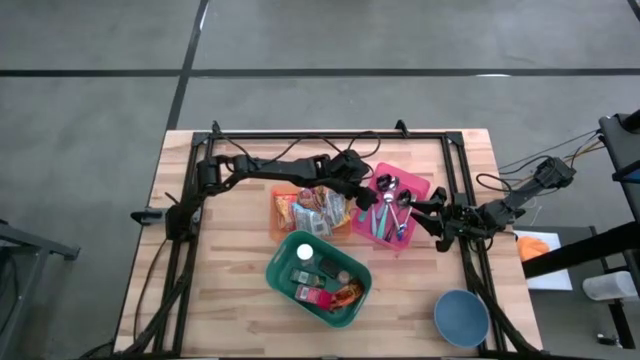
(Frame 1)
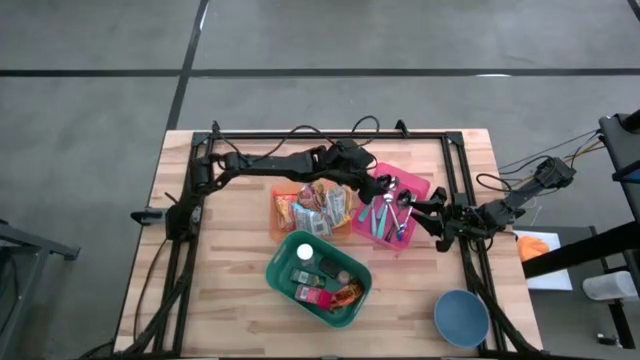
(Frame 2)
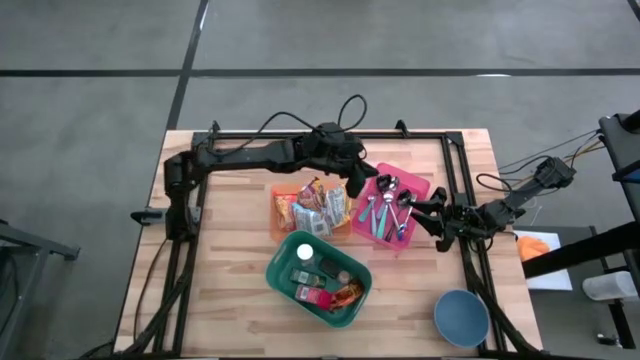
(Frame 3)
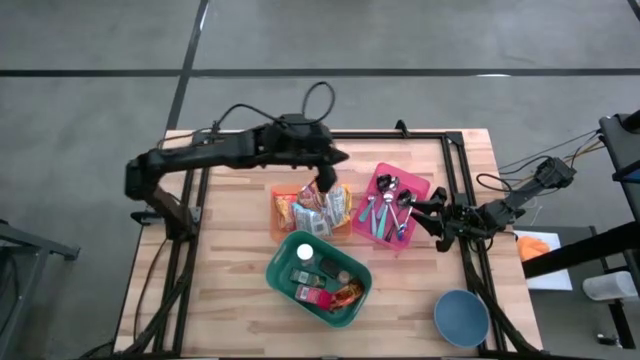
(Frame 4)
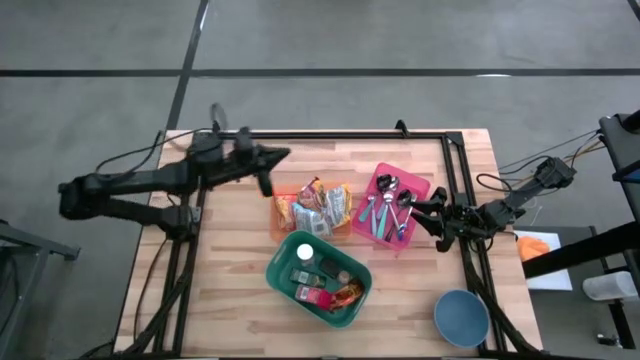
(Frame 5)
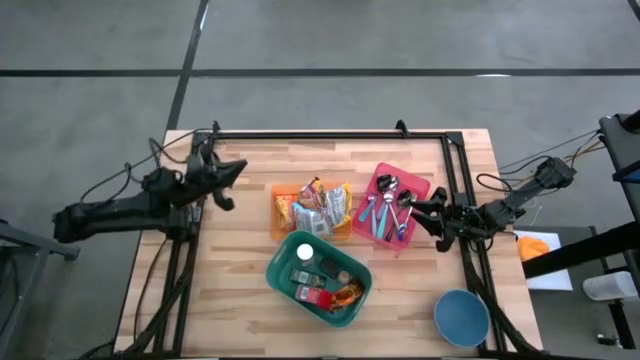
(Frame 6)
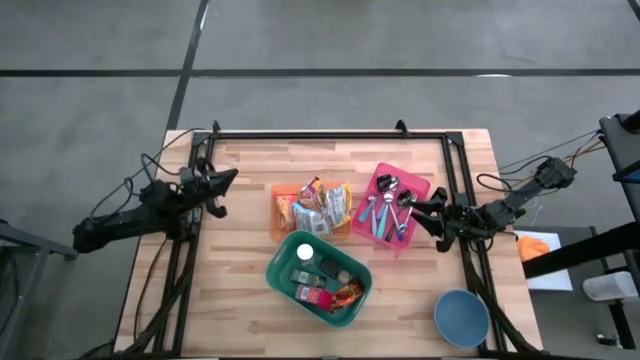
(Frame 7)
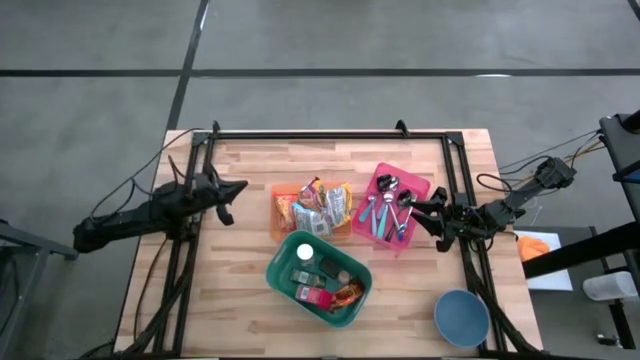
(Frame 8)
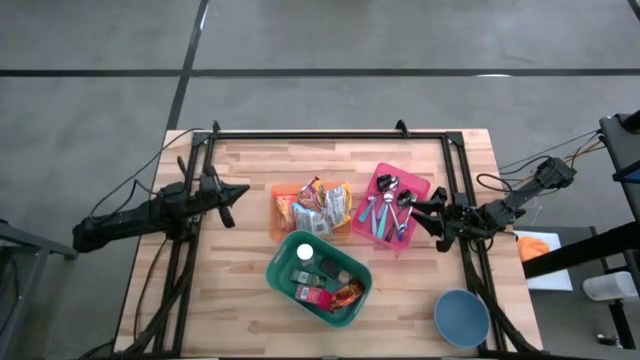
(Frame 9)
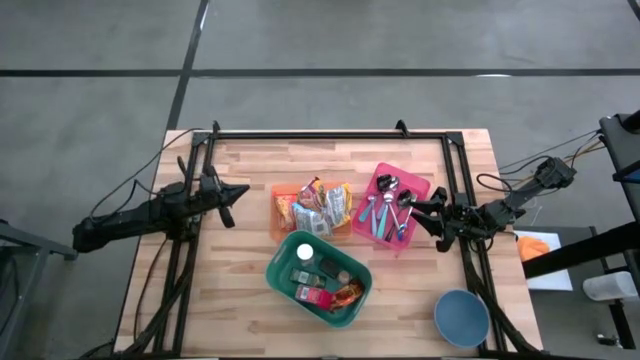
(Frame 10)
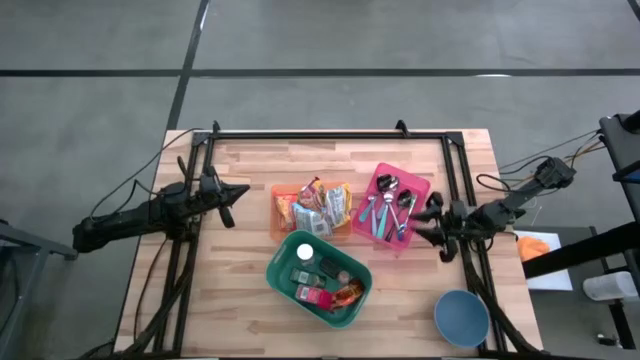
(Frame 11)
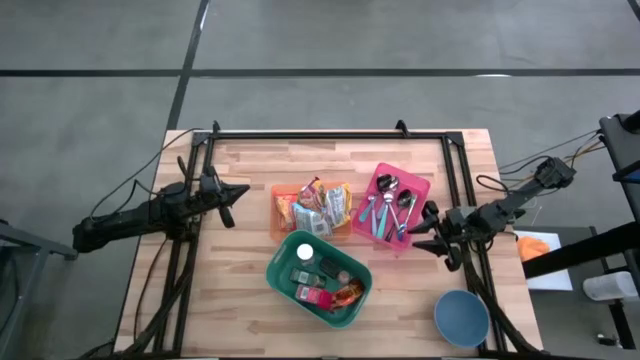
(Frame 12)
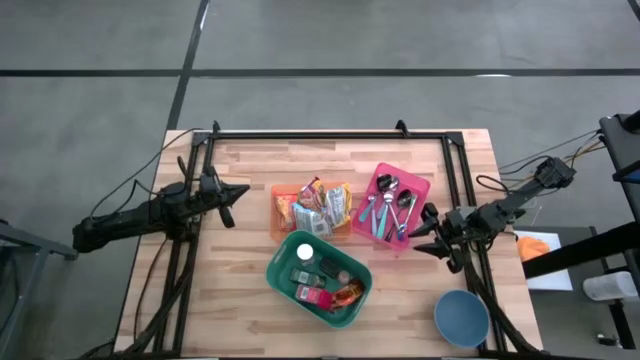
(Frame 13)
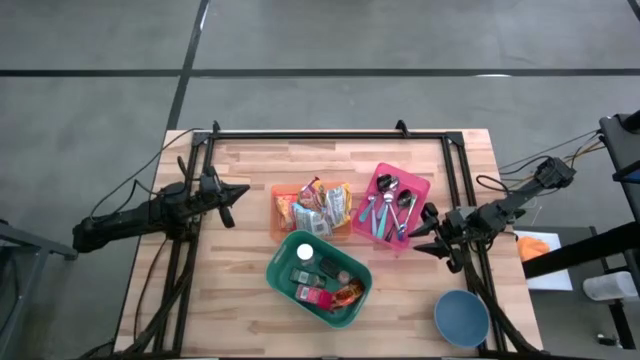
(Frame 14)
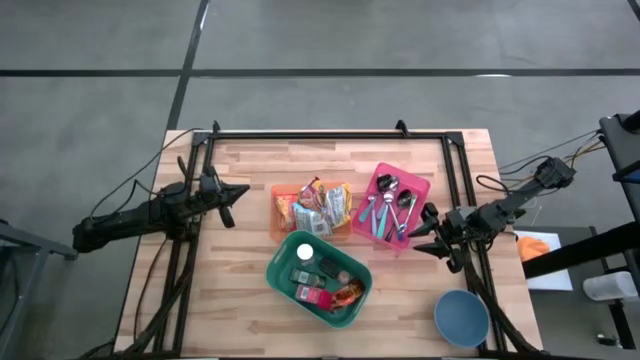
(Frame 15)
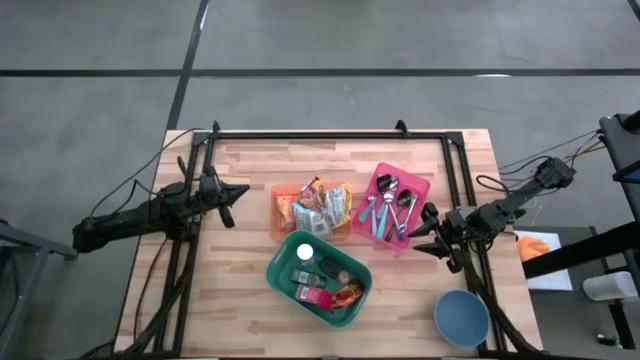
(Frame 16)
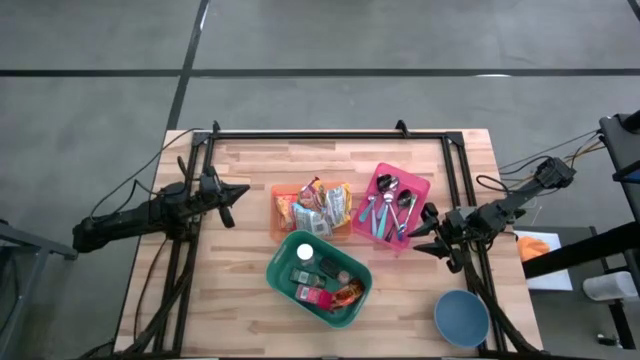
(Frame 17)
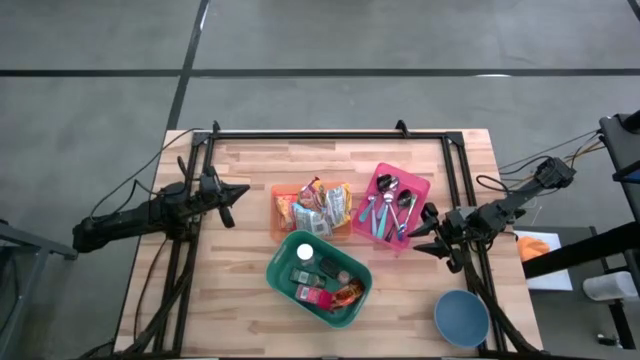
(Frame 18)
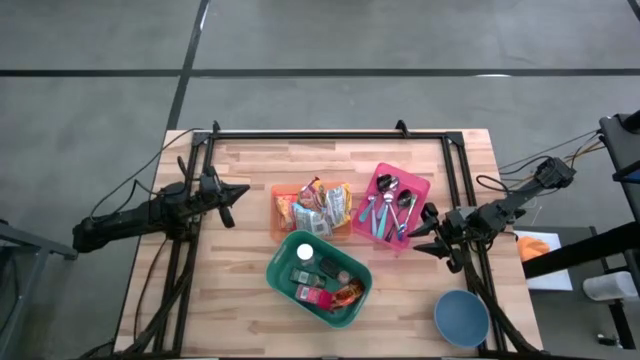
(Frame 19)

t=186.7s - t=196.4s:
Return to Home Position

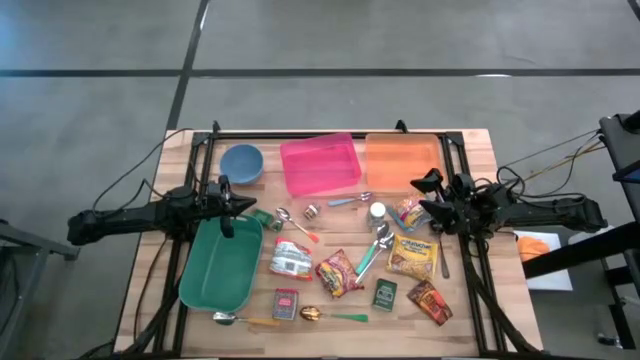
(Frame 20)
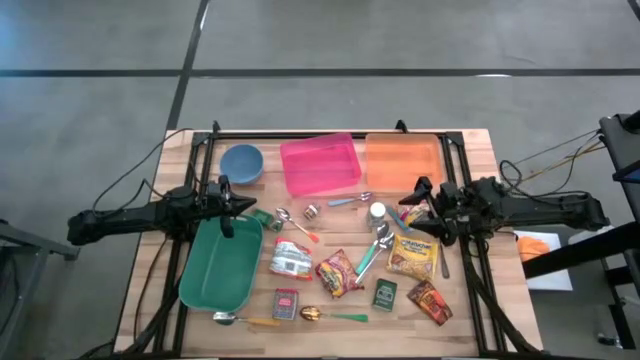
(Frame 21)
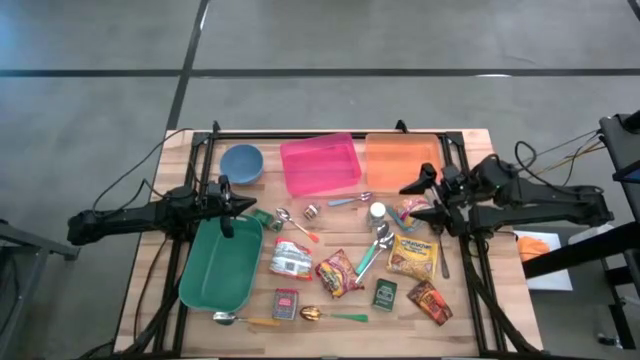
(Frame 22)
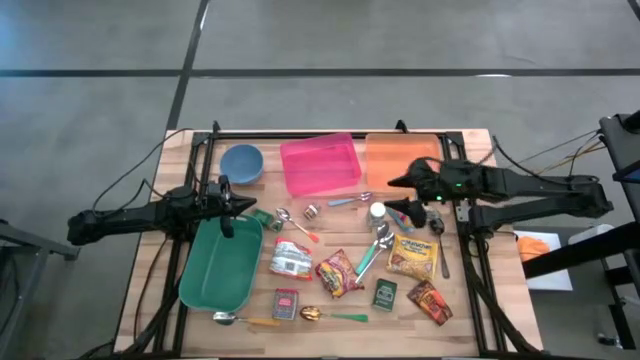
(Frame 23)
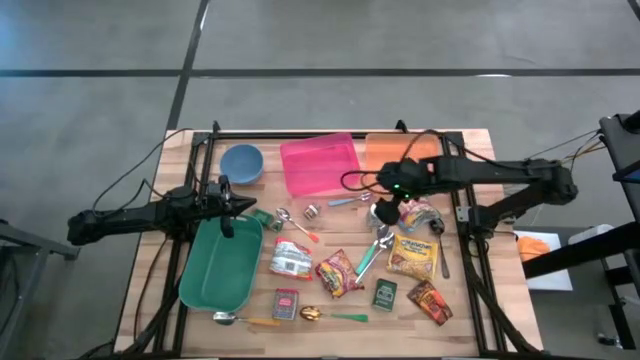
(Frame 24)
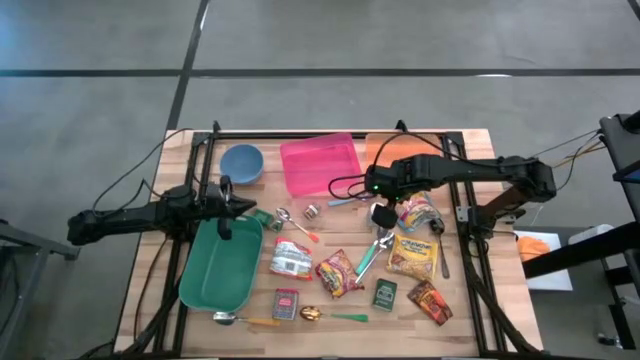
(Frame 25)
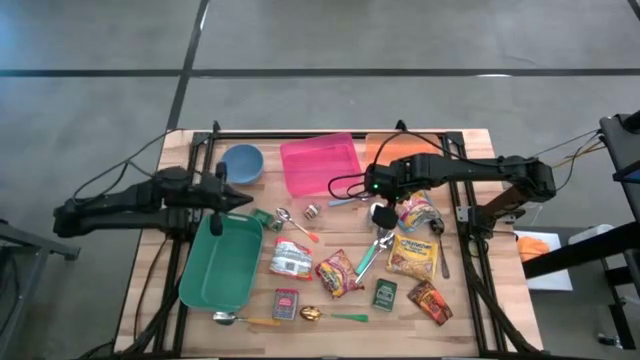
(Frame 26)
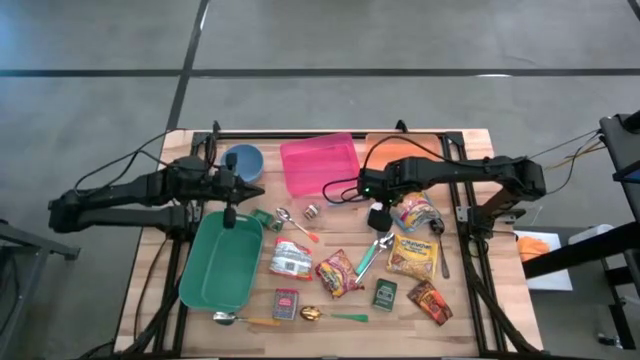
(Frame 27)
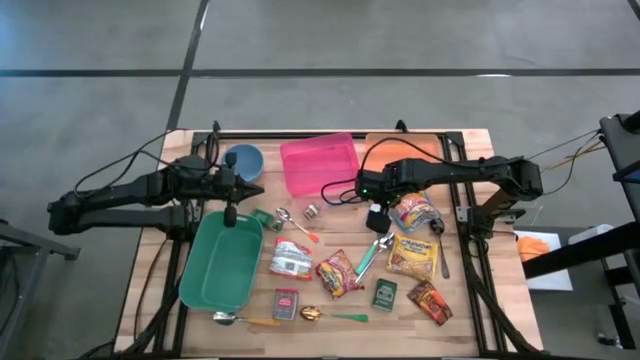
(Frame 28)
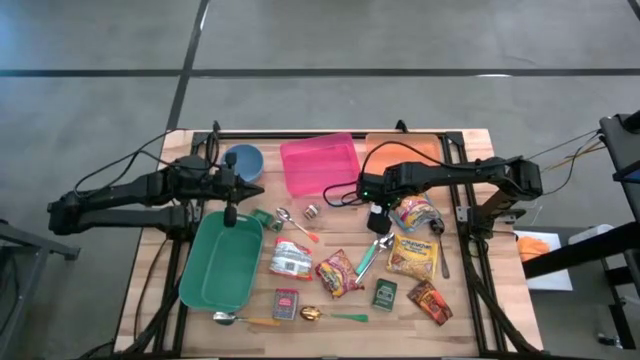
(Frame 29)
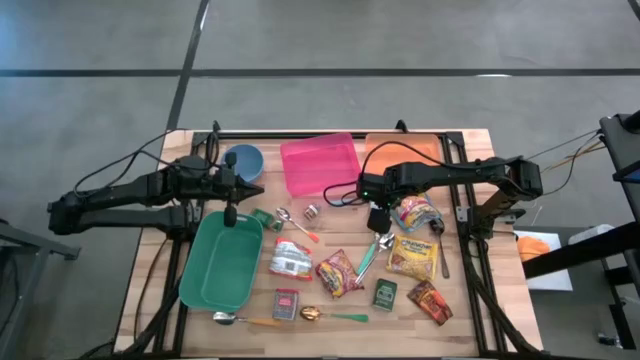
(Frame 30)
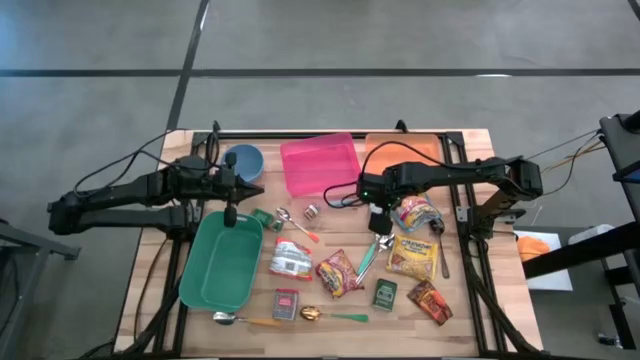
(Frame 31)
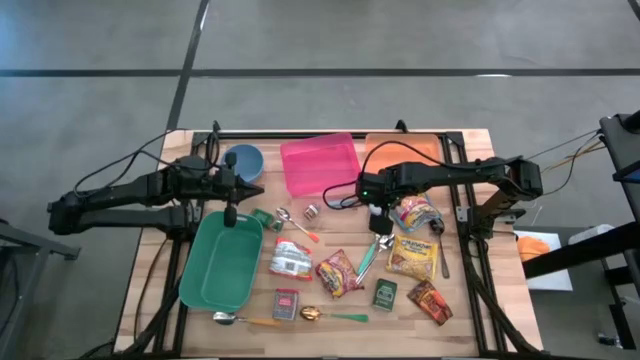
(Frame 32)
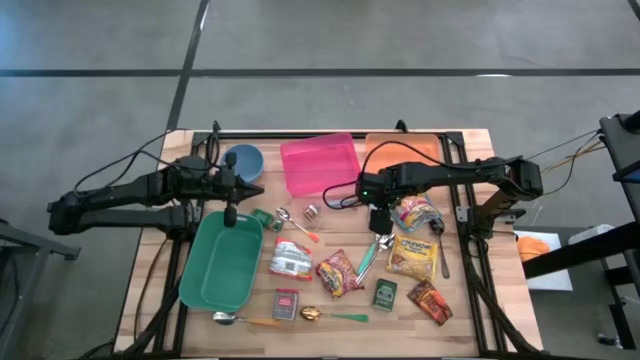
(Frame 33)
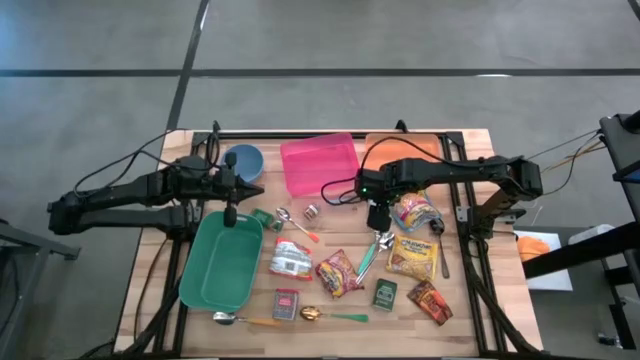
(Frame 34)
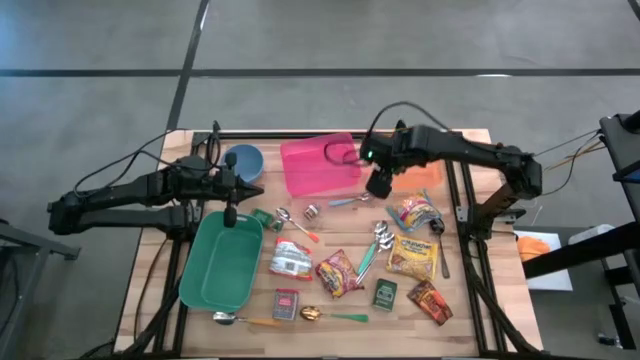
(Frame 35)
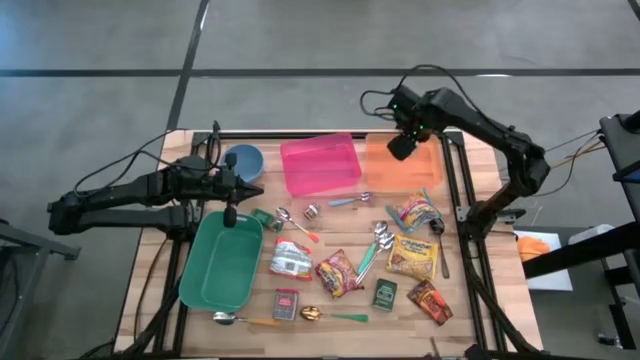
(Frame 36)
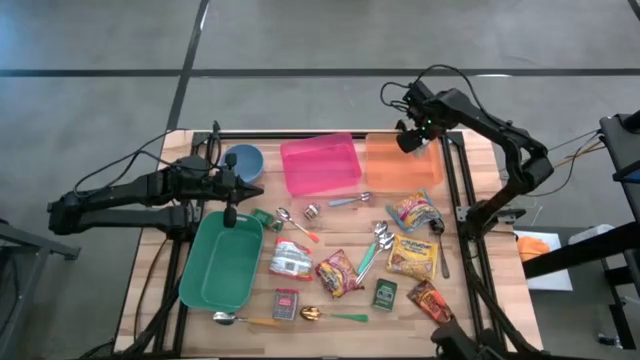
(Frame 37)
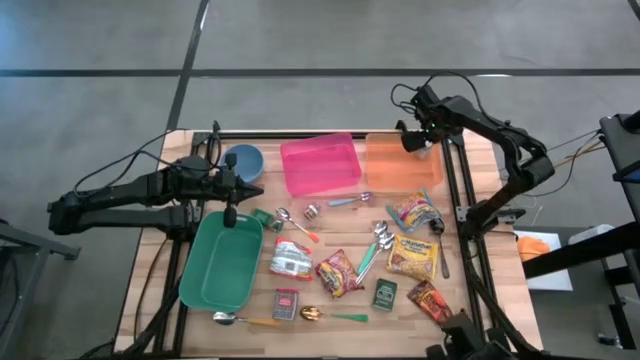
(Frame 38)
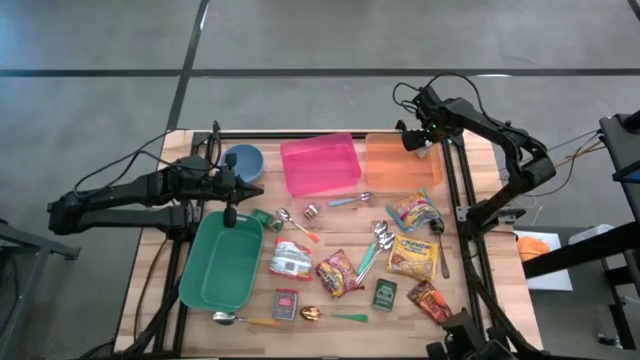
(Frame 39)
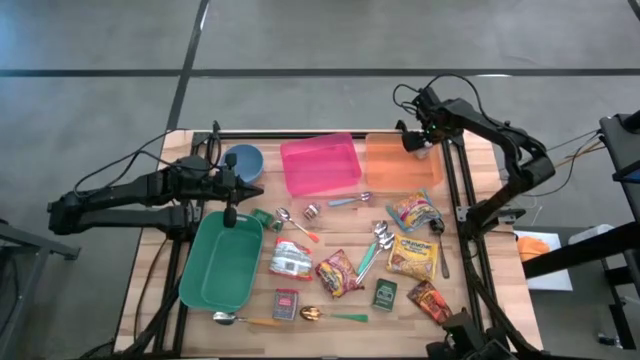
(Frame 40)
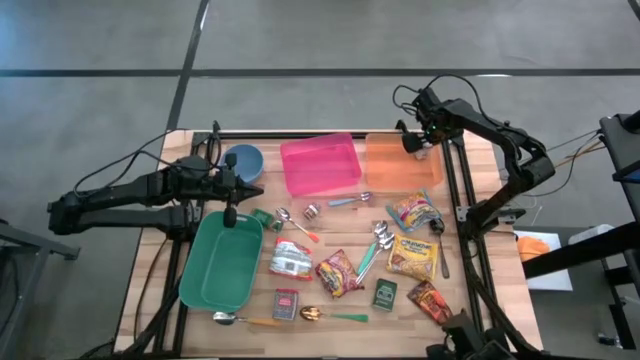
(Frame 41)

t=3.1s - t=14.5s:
Put the white spice bottle into the orange bin
